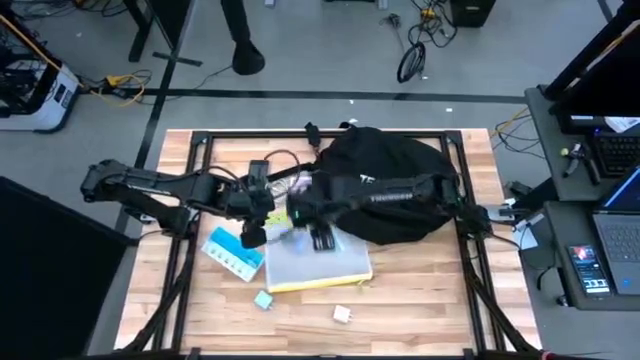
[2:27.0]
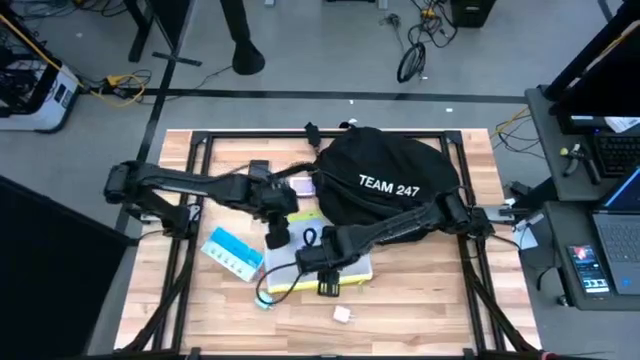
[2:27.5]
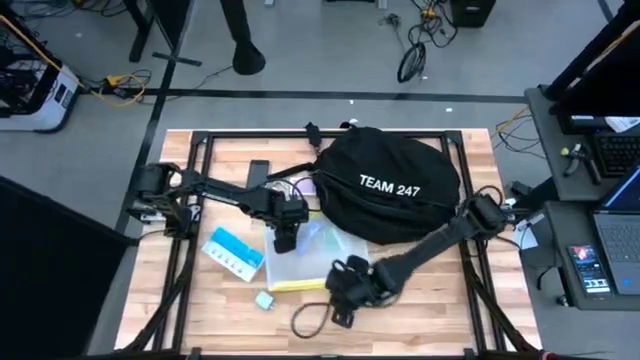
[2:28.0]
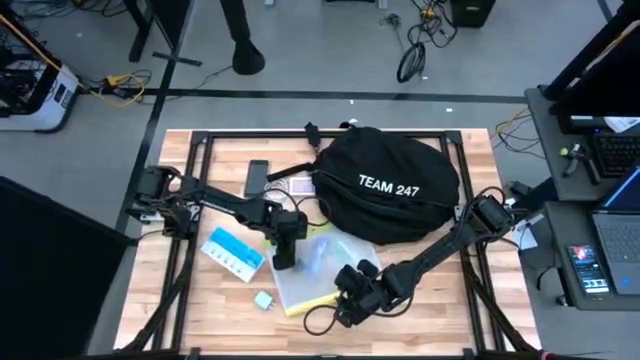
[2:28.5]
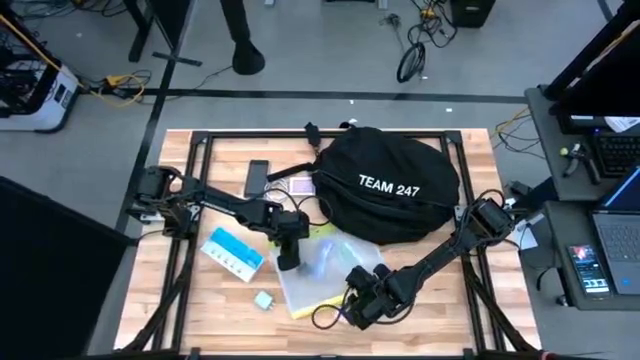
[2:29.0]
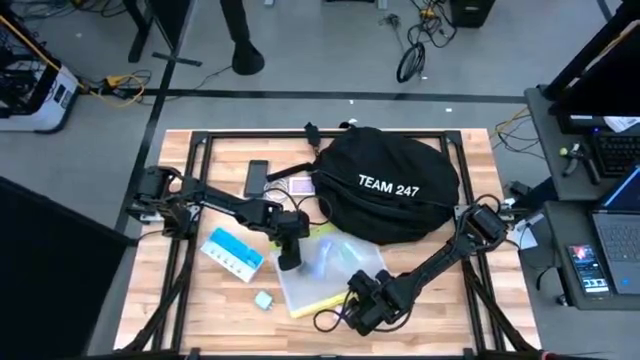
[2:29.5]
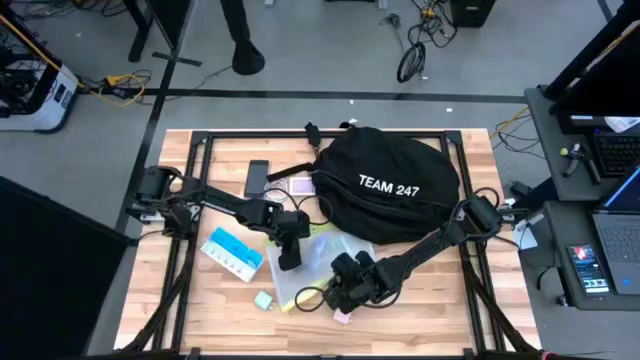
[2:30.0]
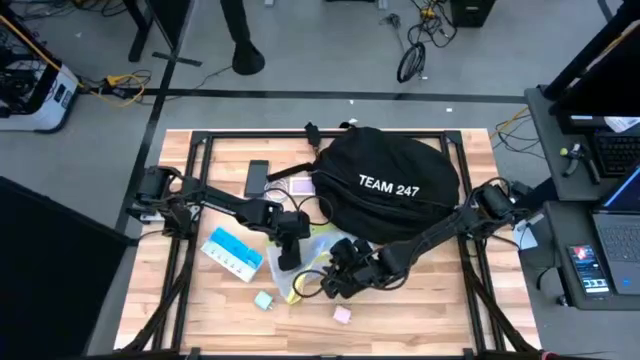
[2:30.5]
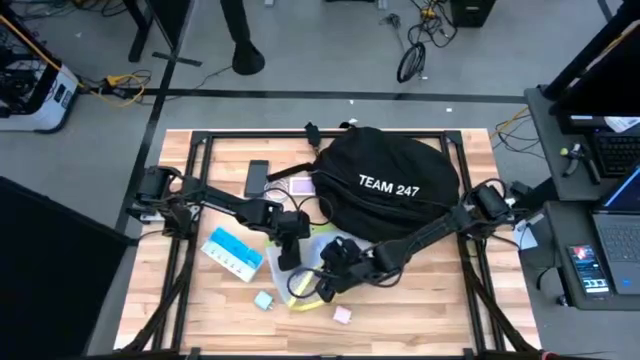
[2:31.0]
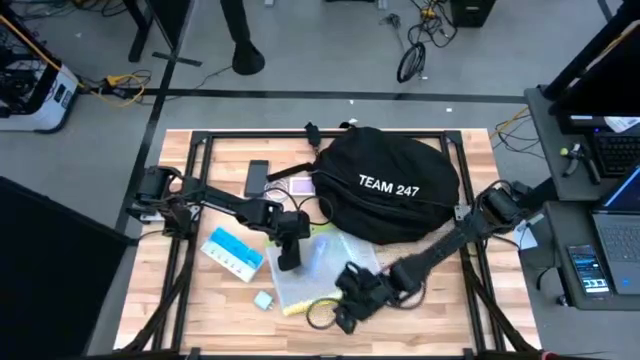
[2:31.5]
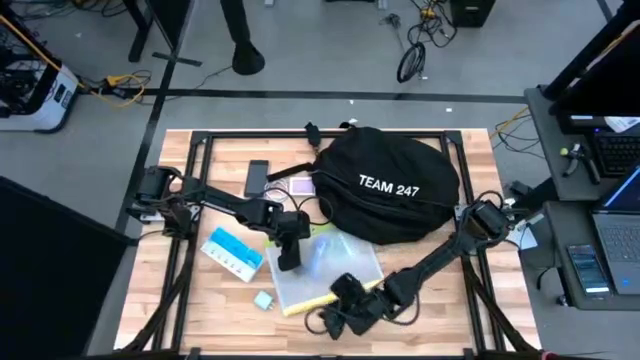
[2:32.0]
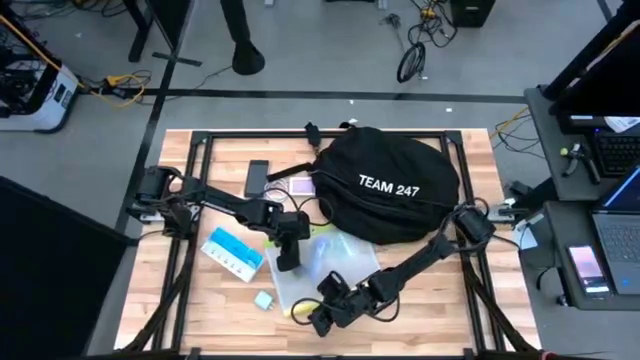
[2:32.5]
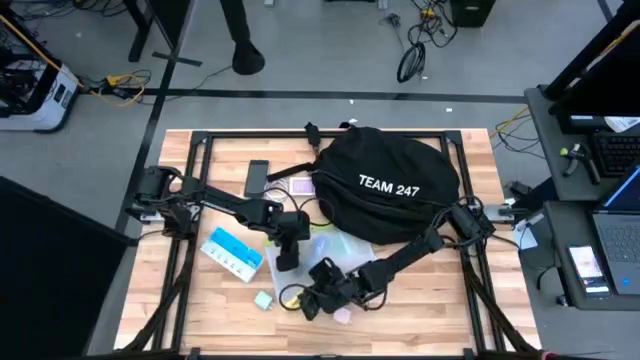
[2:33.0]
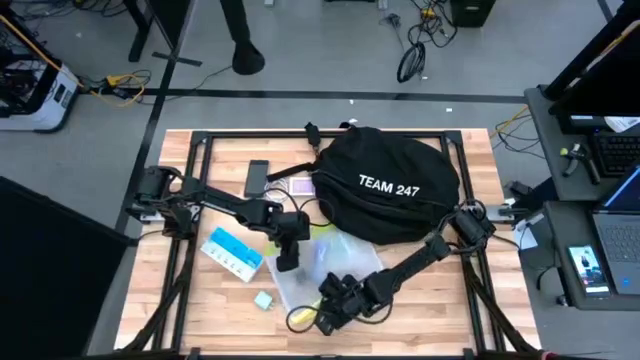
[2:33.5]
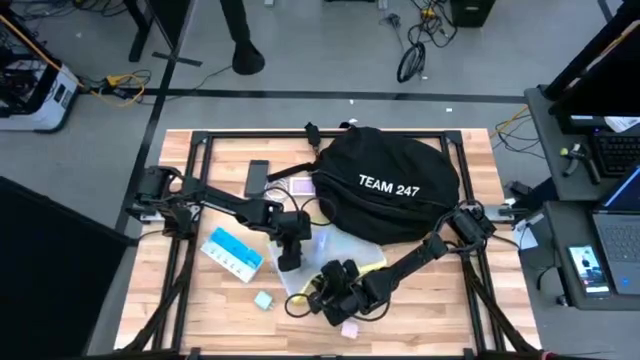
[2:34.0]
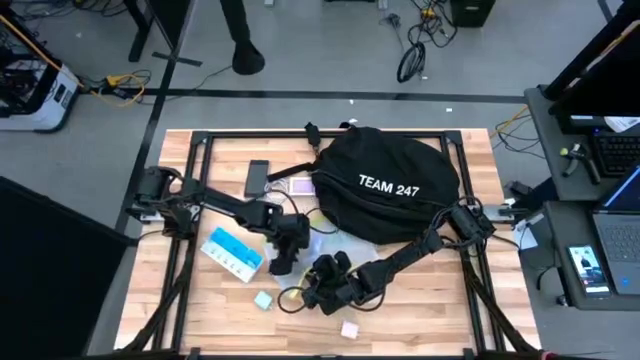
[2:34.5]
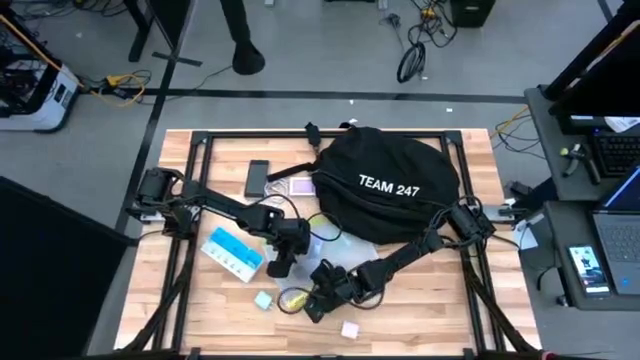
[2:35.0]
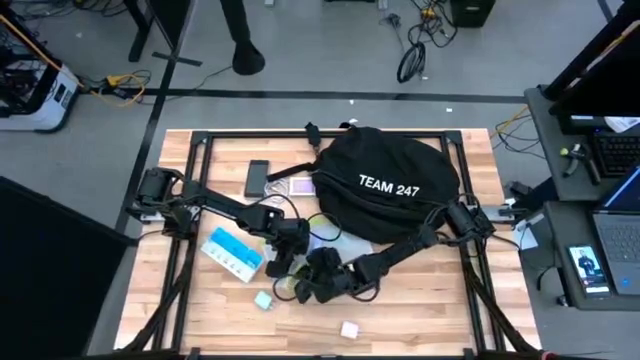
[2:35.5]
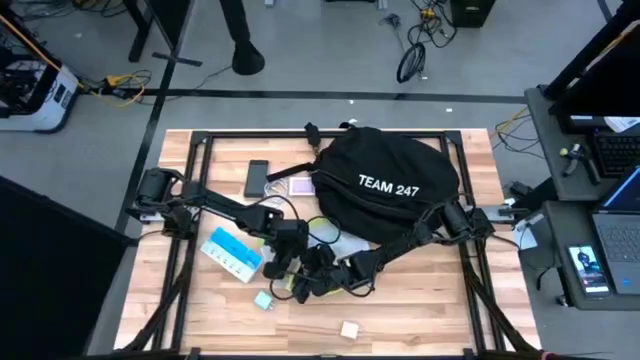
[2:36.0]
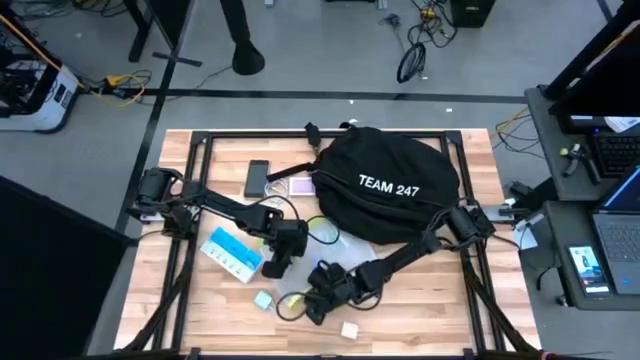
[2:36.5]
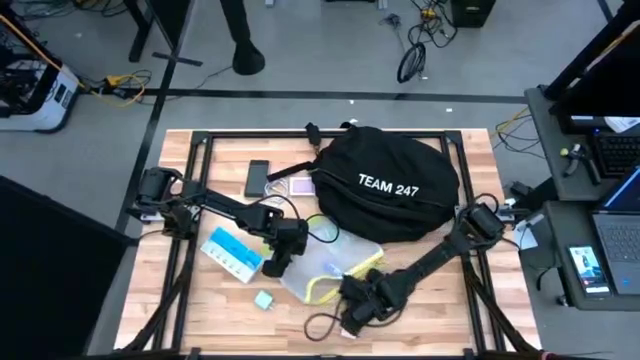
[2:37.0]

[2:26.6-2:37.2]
Task: Unpack backpack
Remove the black charger adapter from the green zip bag

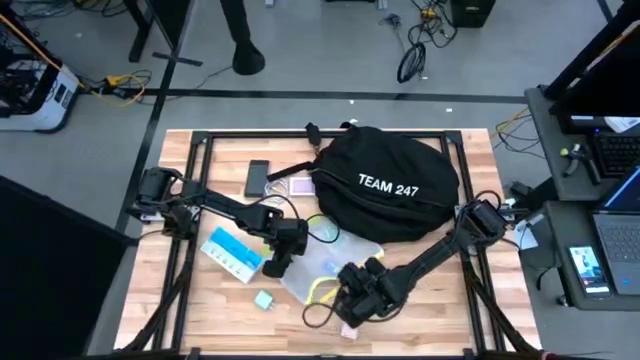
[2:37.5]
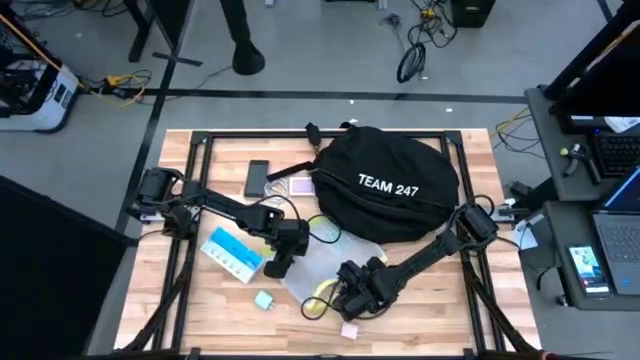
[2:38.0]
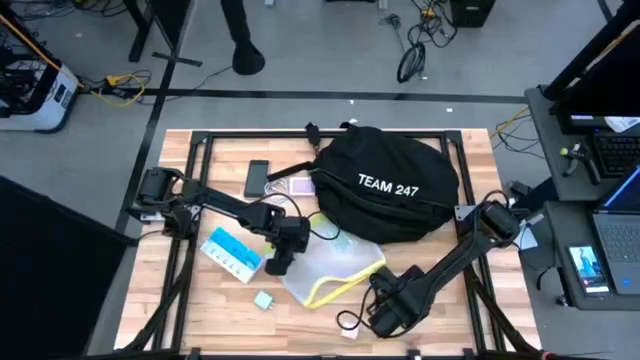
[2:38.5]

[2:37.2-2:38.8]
Remove the violet chocolate bar from the green zip bag

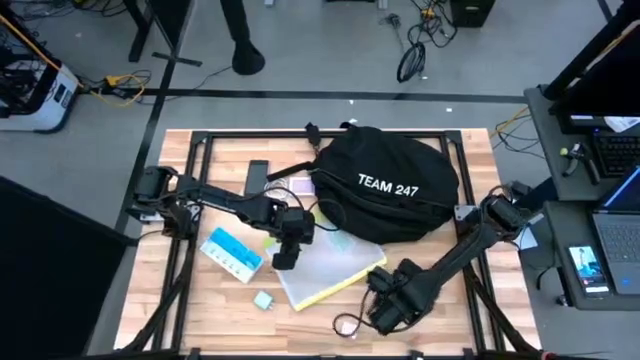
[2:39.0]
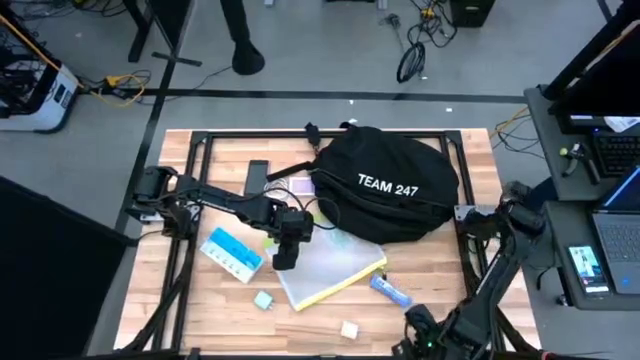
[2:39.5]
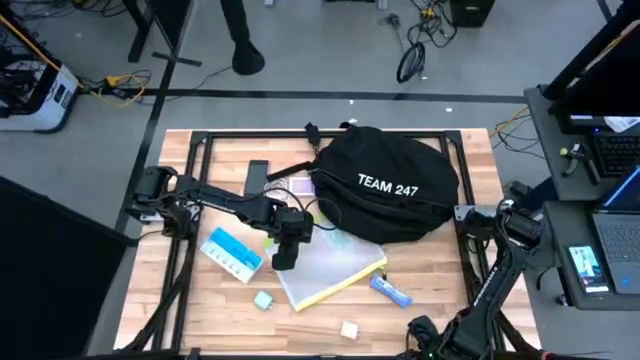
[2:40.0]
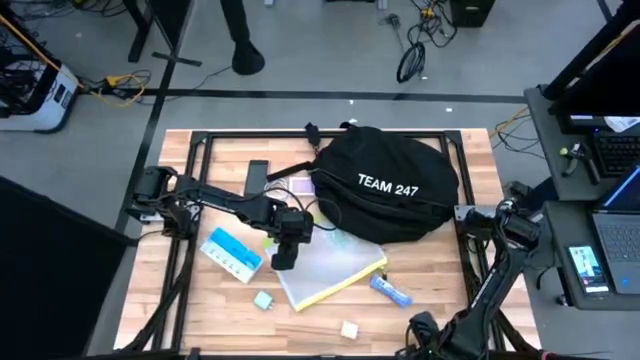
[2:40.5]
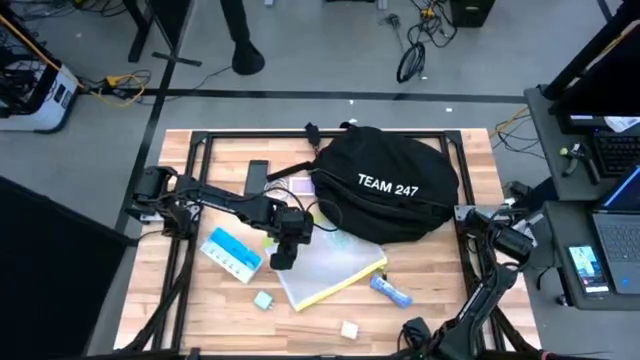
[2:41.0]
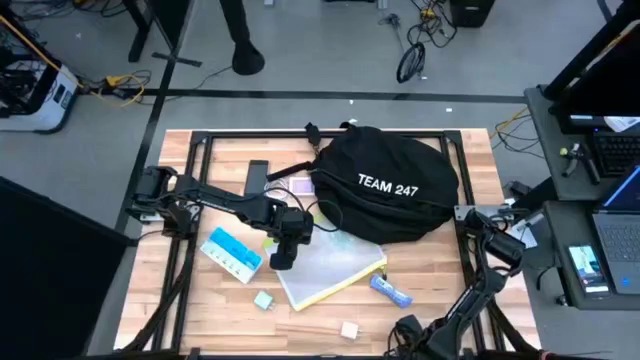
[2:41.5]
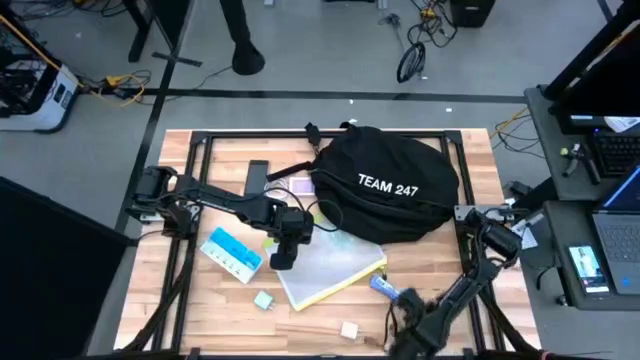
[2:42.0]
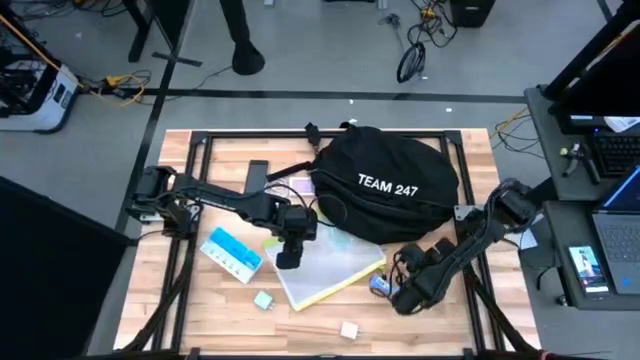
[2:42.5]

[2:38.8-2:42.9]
Adjust the black charger adapter

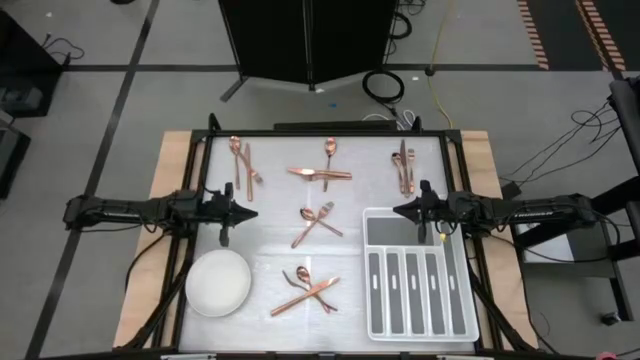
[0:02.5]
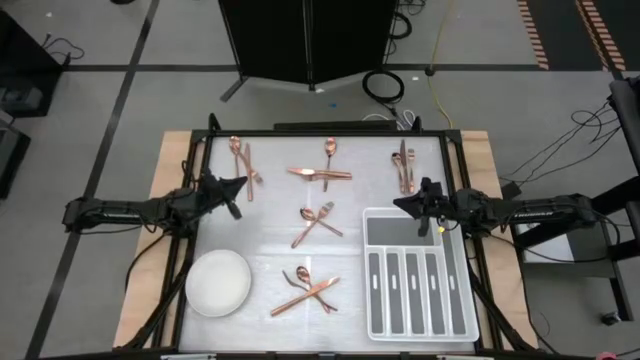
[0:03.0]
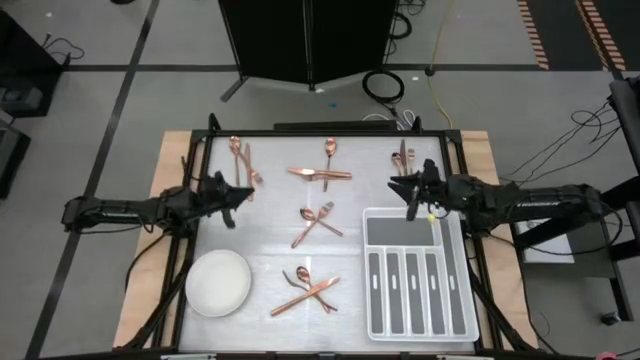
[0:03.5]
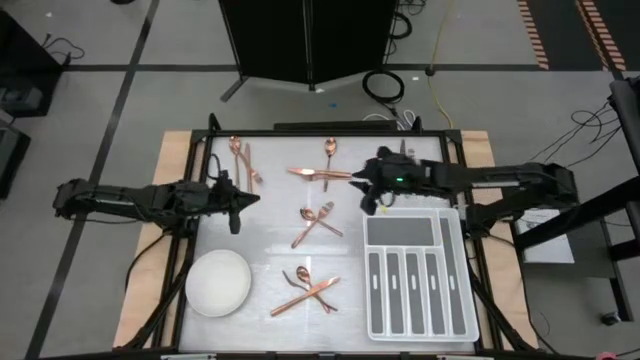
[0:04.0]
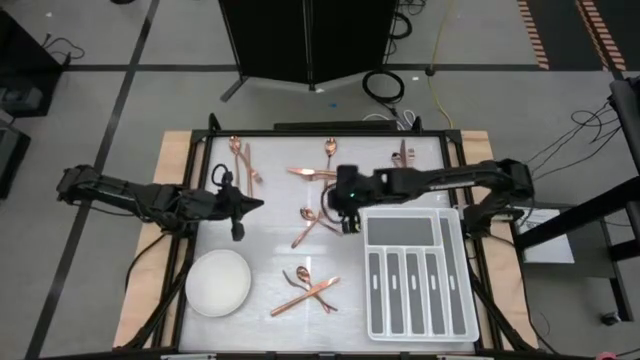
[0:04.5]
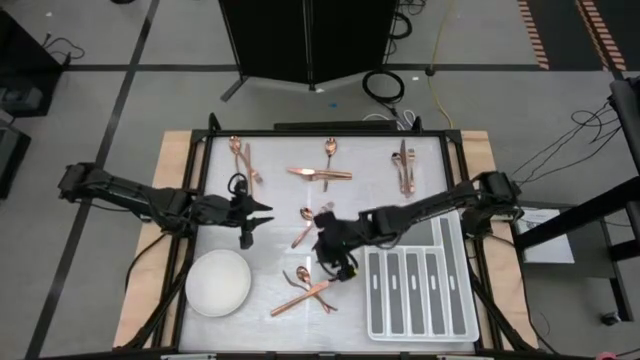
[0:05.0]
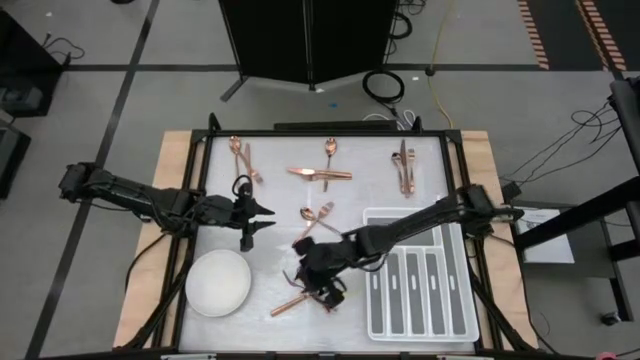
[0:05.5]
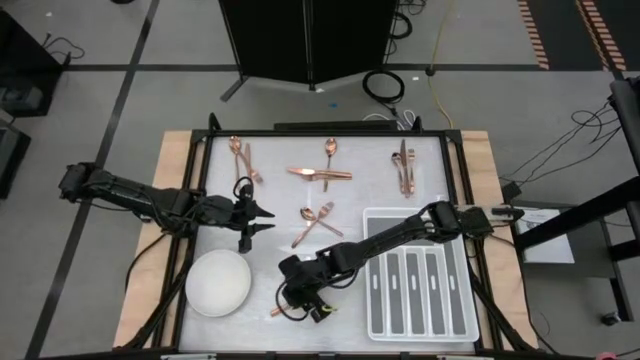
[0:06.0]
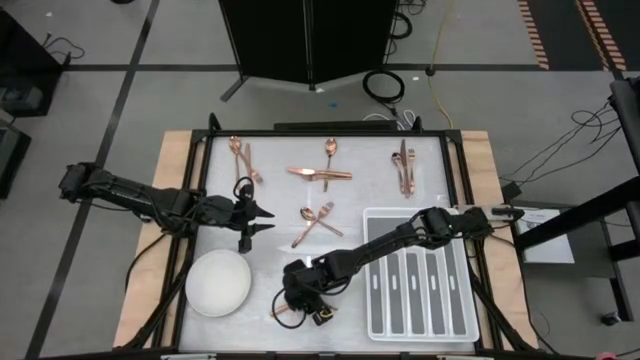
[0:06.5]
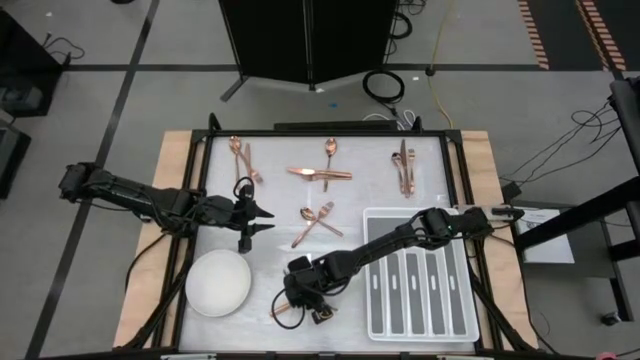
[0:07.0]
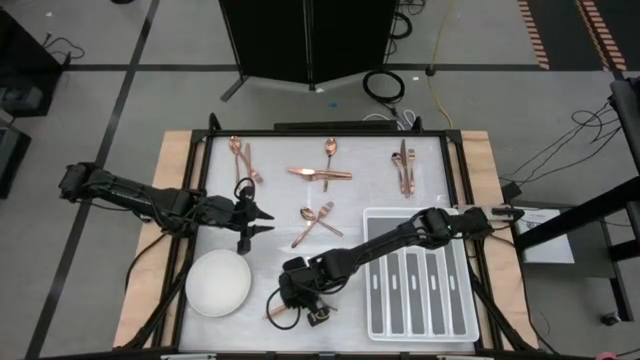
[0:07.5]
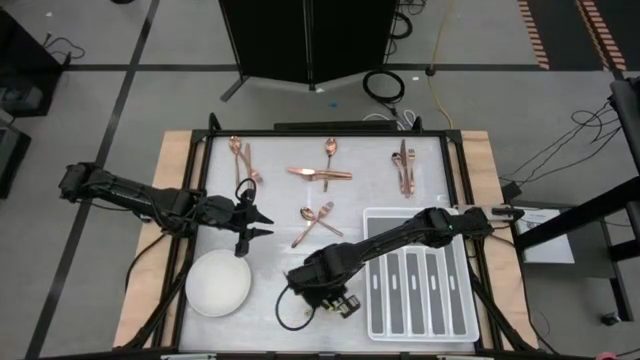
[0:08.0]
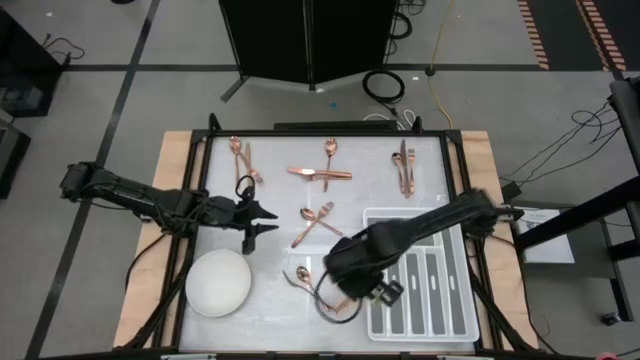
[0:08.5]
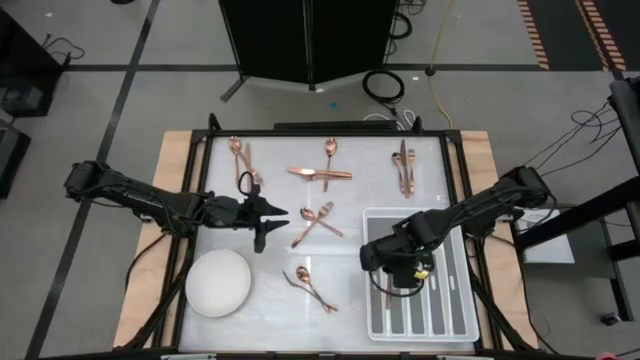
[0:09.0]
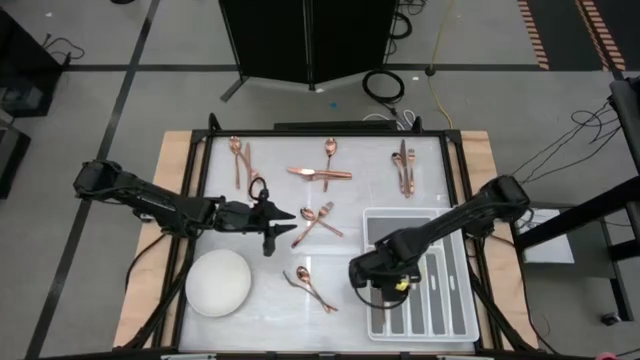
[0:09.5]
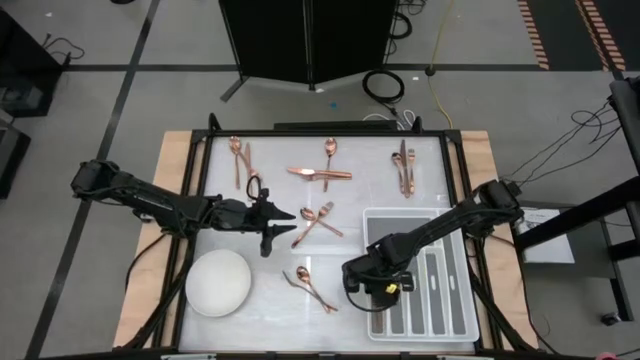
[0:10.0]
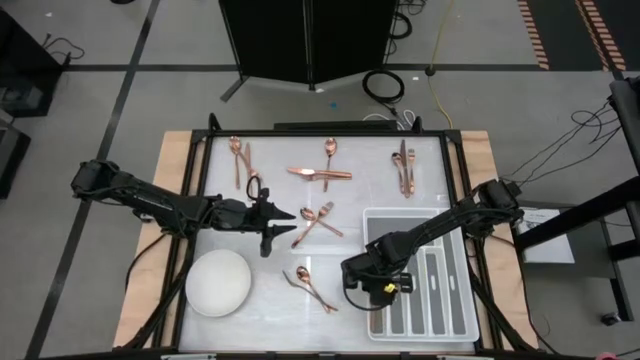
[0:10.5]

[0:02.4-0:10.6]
Task: Sort silverware
Put the brown knife in the white silverware organizer
